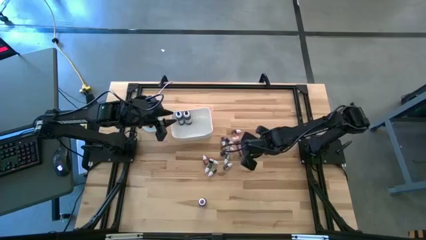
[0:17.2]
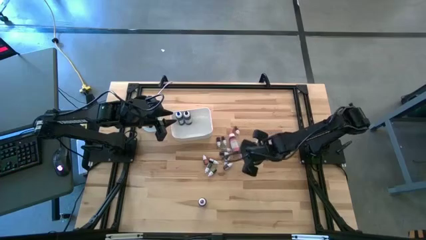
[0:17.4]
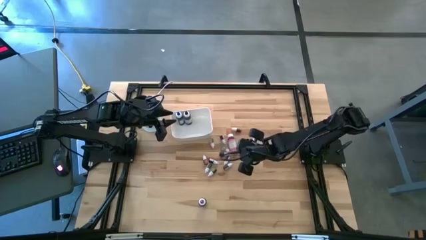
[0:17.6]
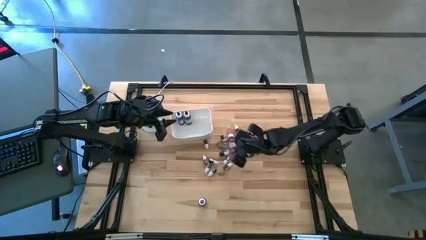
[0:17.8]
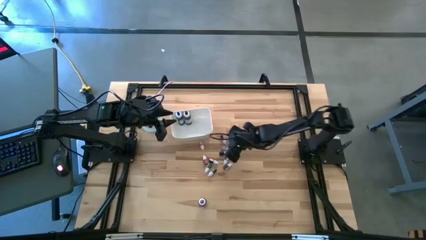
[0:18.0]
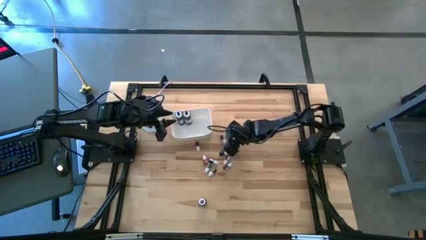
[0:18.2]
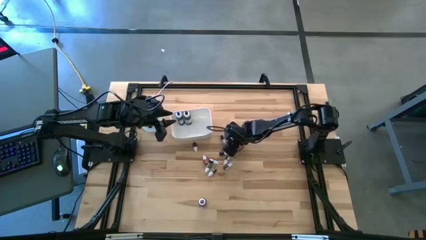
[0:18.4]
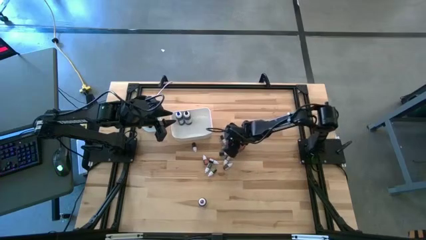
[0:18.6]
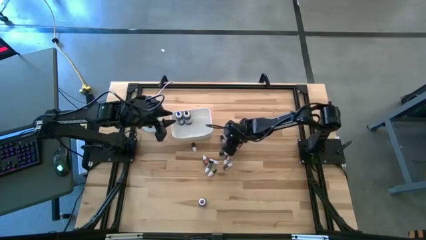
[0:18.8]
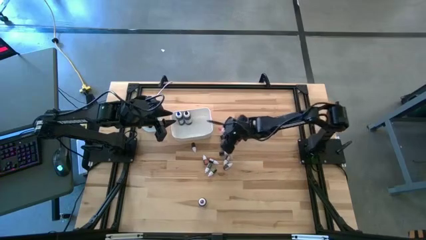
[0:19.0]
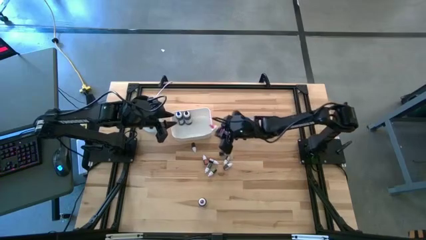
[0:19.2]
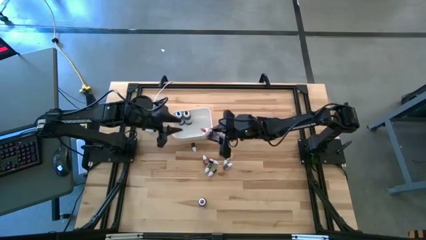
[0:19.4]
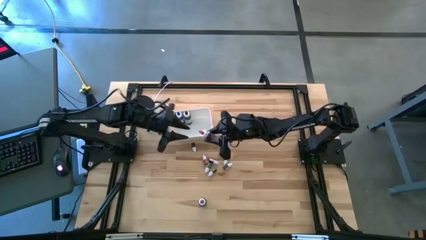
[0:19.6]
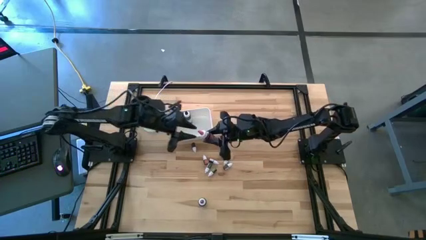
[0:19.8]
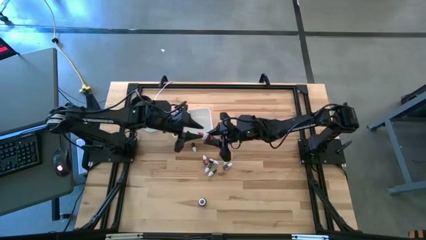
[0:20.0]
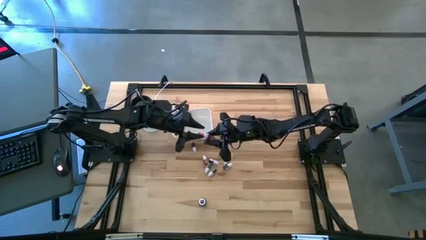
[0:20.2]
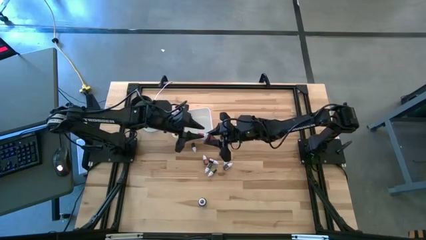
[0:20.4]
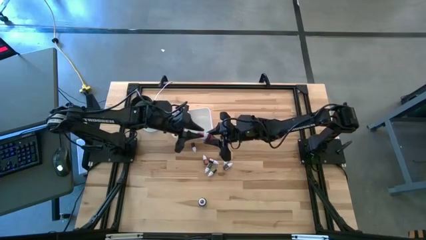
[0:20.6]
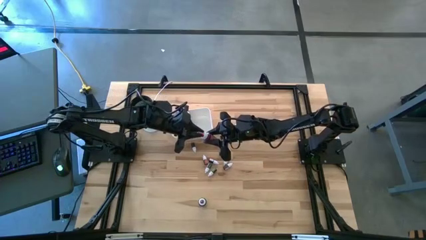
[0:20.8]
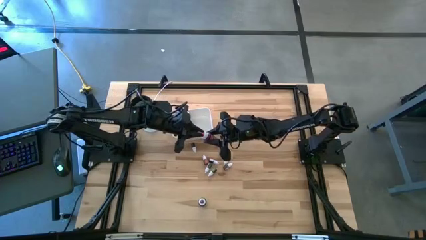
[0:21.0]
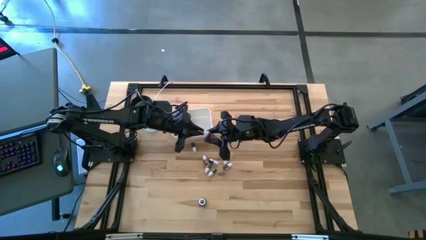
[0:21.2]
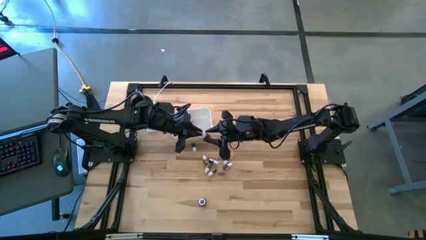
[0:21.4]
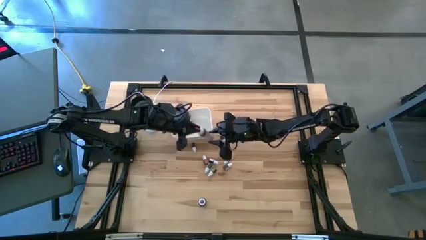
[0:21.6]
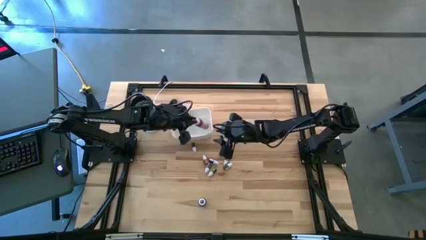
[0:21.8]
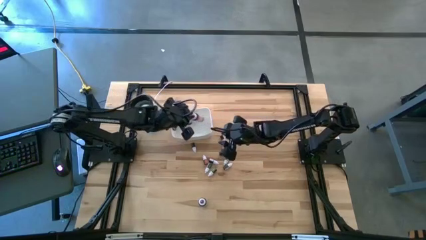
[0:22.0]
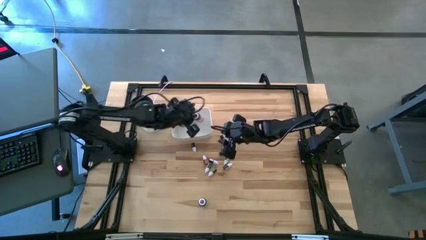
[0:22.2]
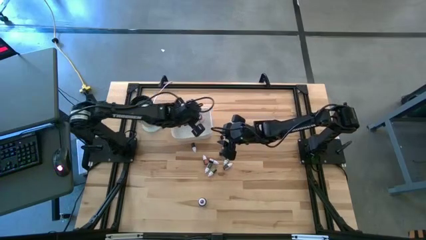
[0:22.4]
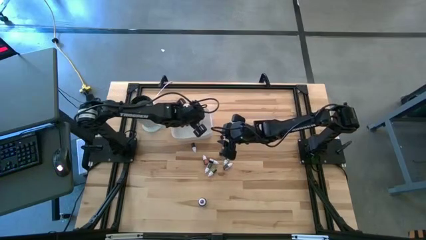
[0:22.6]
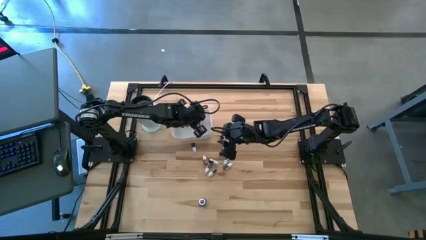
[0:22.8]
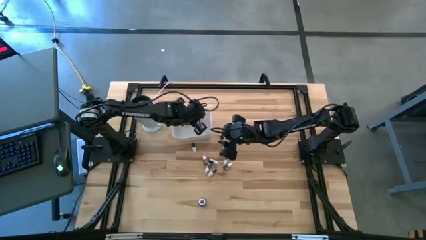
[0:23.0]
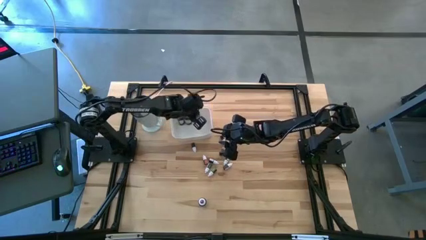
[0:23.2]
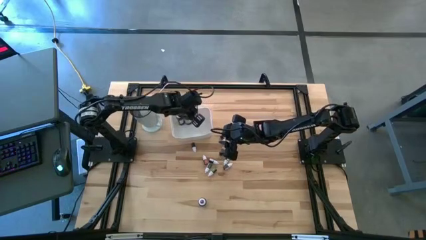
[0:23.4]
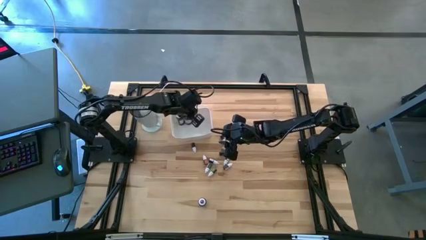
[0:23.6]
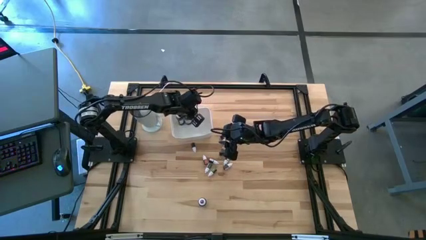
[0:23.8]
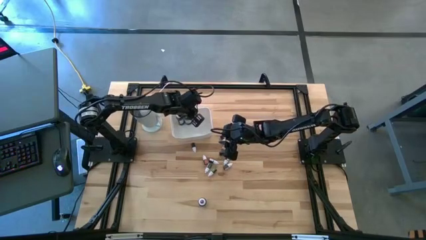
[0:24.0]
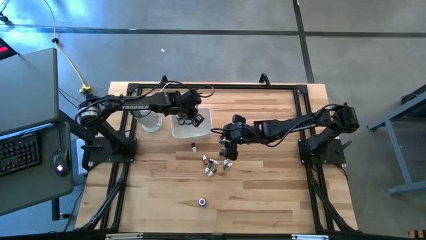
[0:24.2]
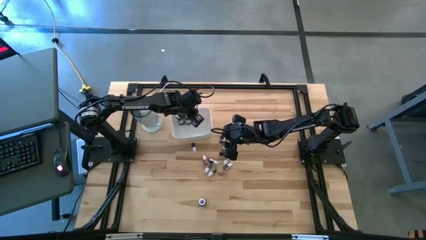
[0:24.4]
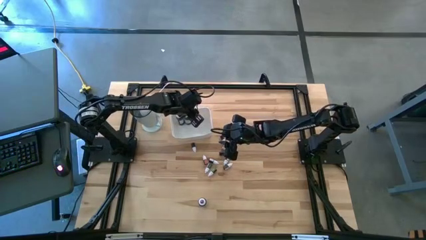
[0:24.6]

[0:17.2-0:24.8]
Task: Pick & Place food coloring
Put the large pink food coloring bottle into the white bin

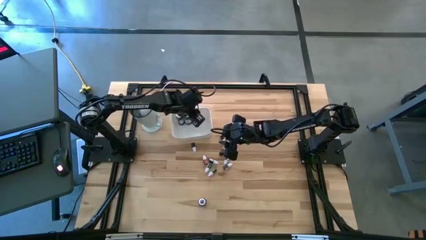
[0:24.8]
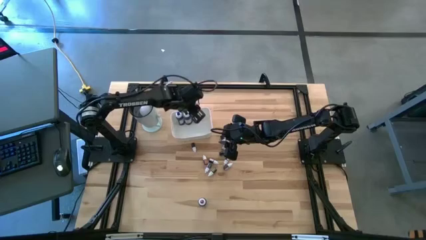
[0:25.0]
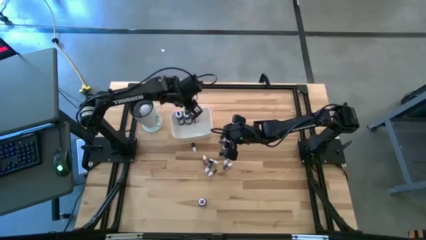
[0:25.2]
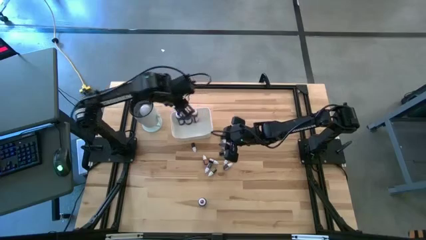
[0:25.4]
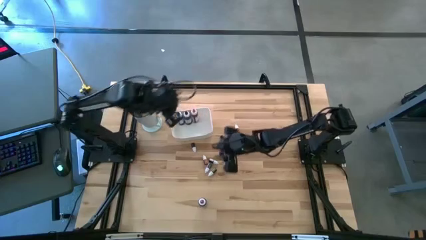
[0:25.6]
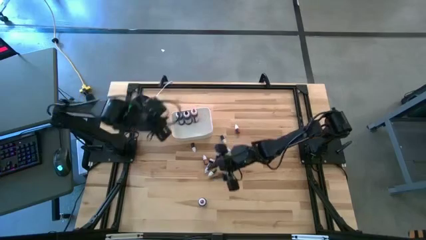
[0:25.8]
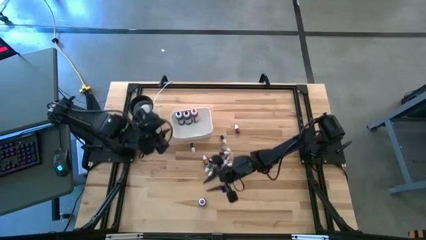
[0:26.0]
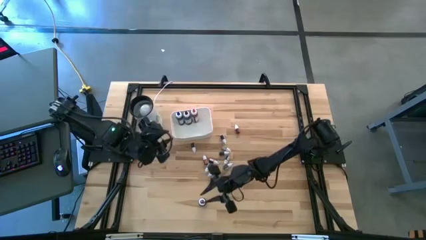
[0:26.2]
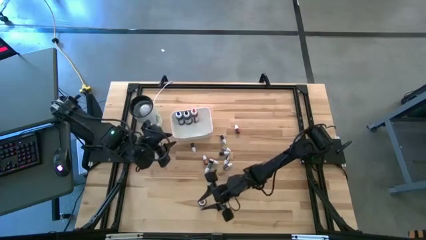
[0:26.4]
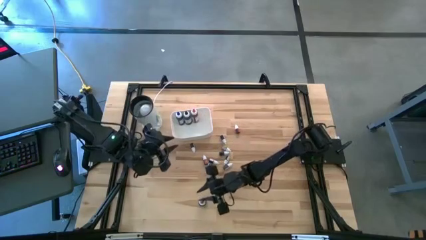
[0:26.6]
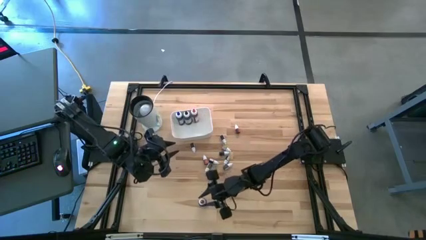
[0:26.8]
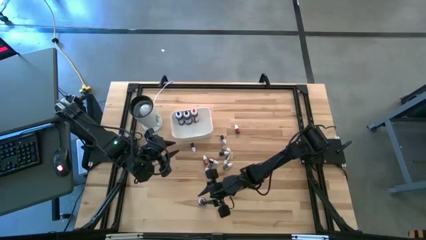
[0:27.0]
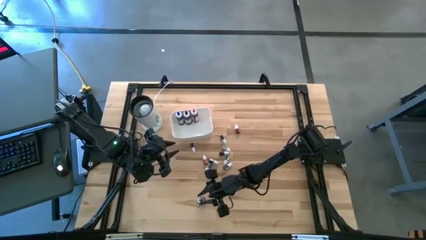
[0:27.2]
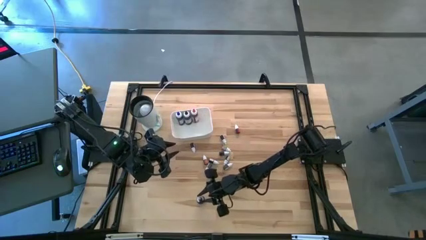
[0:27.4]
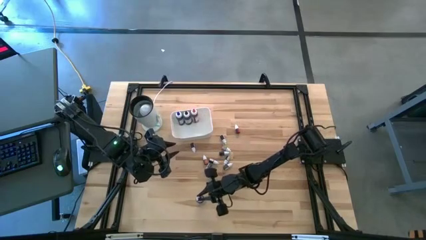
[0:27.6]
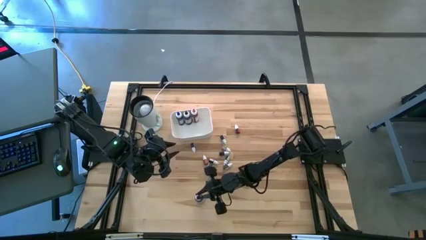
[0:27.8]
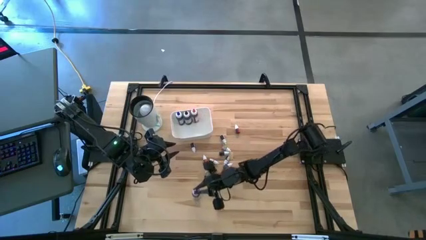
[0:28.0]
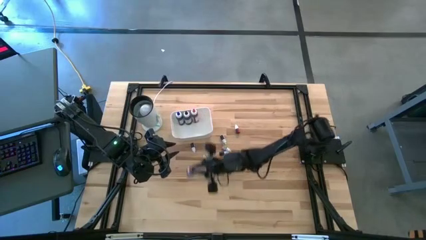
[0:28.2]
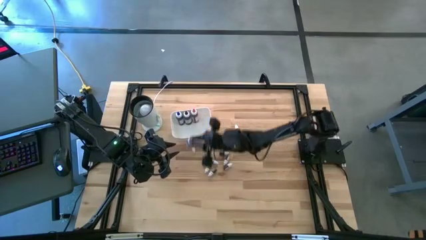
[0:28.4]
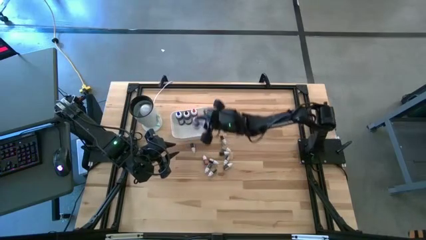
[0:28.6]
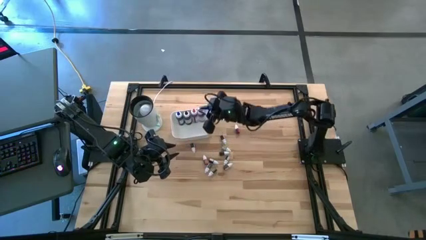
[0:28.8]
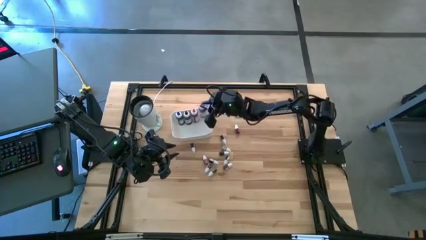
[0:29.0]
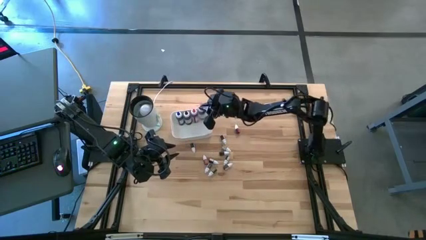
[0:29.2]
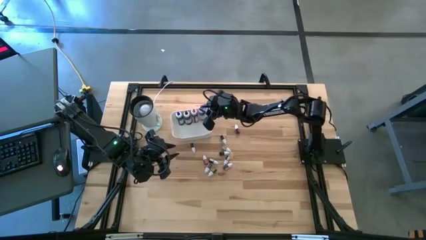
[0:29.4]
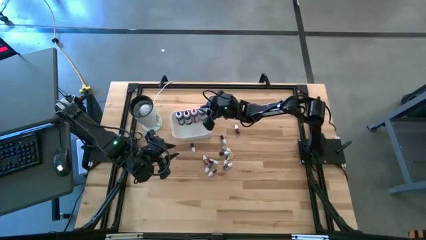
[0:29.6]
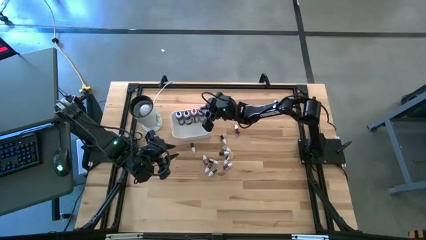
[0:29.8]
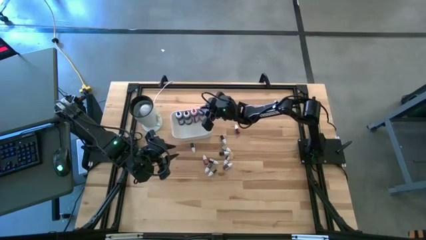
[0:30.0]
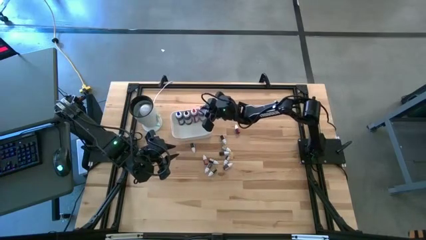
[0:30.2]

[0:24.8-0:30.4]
Put the large violet food coloring bottle into the white bin

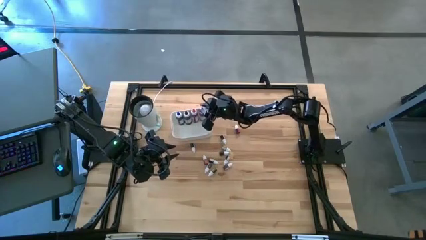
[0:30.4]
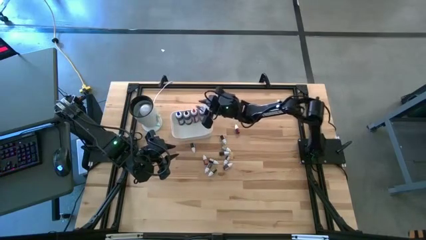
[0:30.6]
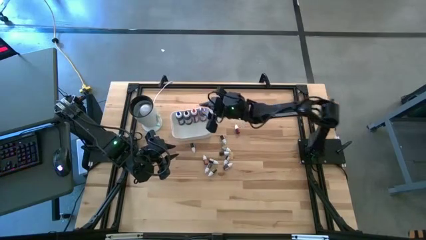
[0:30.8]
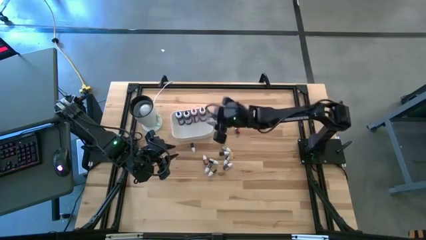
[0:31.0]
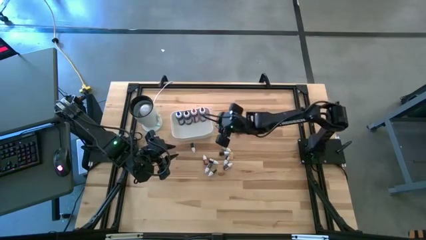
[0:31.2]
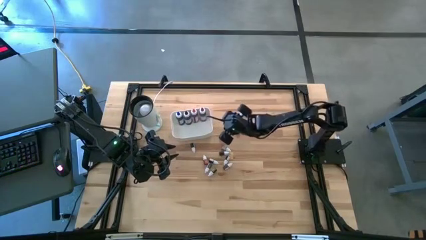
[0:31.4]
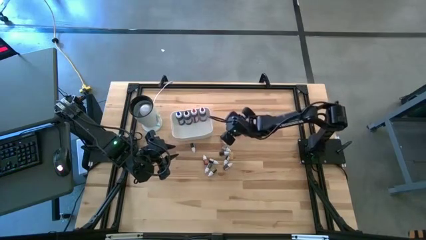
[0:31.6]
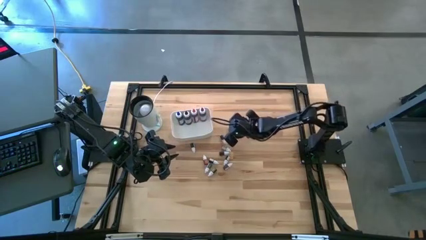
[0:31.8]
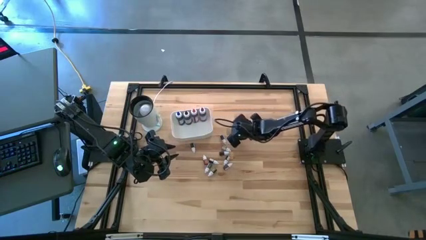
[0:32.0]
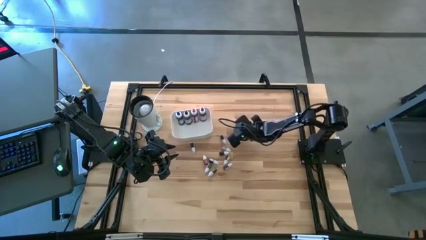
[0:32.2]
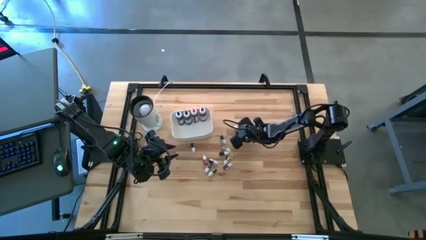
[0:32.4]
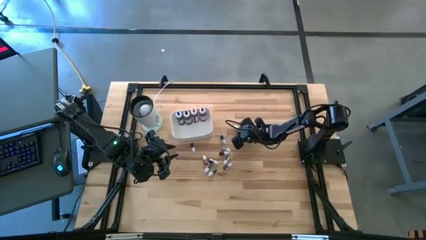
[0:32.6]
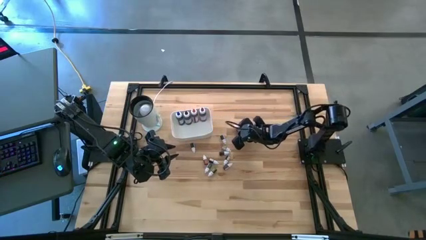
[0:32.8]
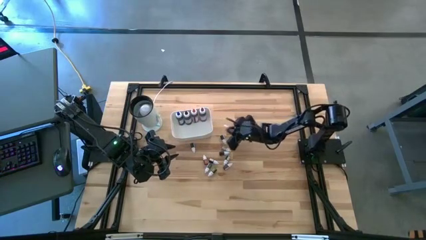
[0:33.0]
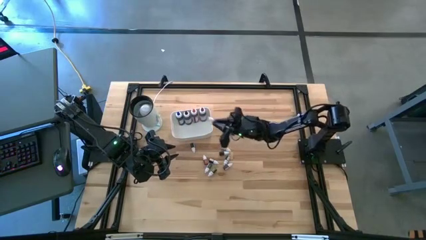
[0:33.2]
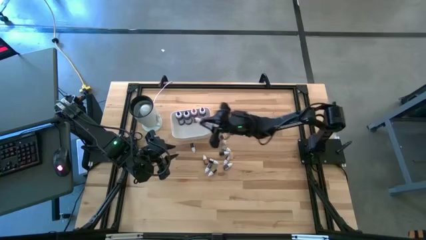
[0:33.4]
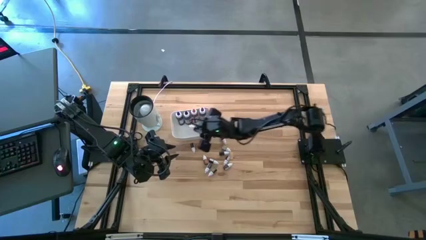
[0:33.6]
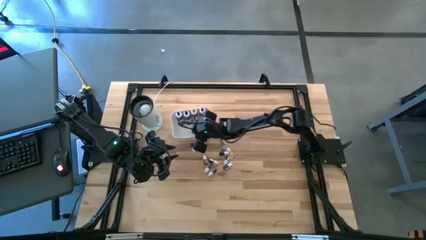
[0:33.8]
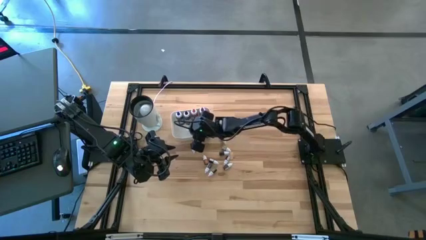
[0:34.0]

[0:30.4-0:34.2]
Put the small red food coloring bottle into the white bin
